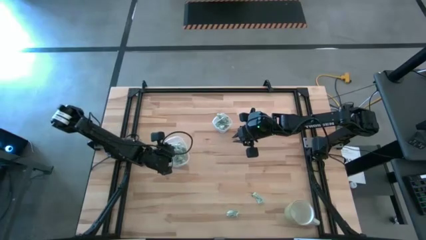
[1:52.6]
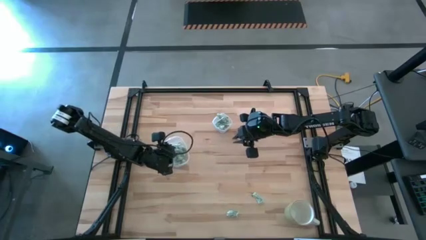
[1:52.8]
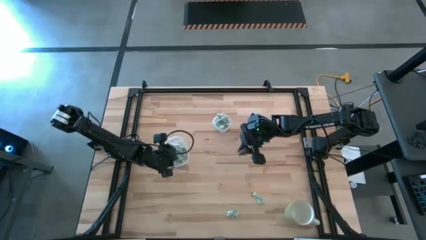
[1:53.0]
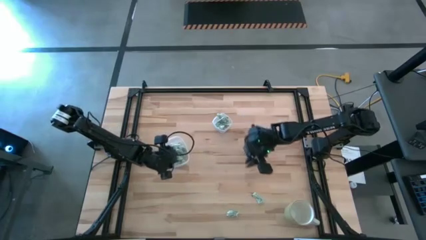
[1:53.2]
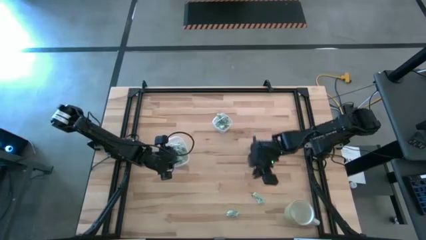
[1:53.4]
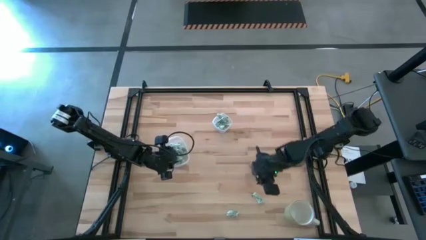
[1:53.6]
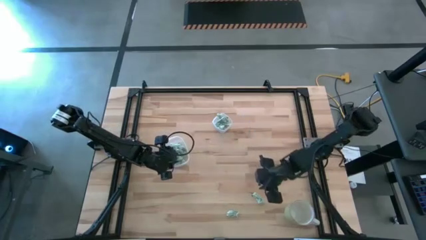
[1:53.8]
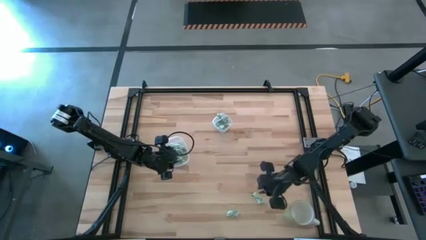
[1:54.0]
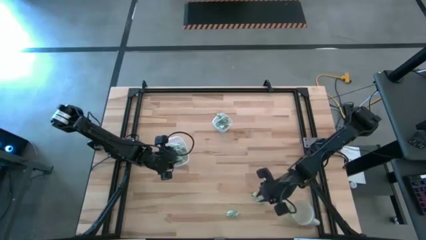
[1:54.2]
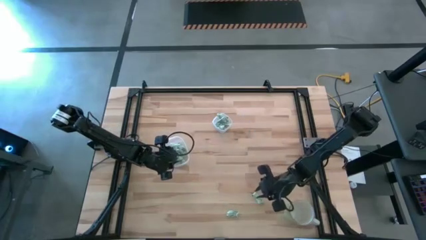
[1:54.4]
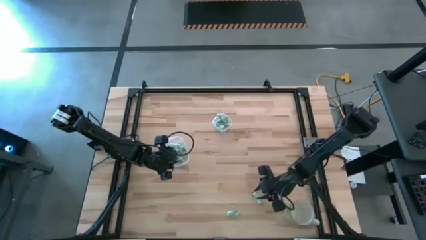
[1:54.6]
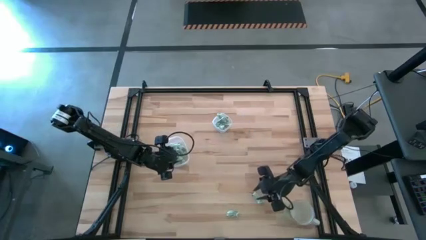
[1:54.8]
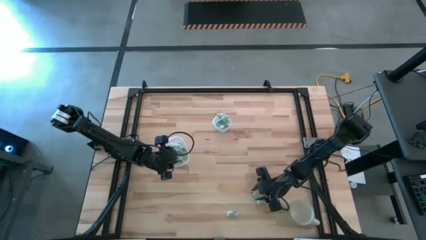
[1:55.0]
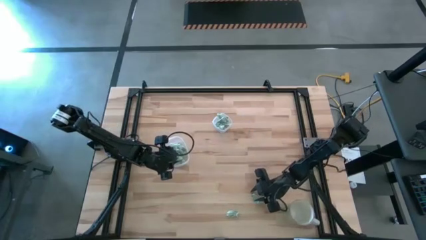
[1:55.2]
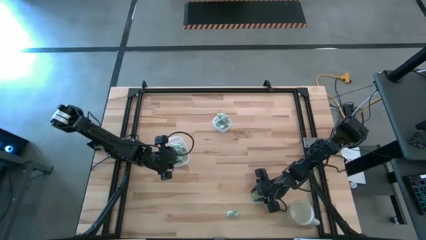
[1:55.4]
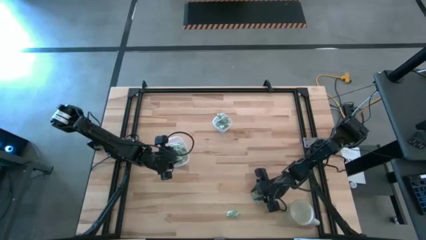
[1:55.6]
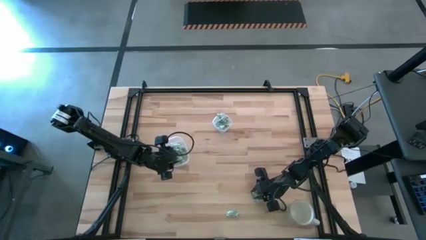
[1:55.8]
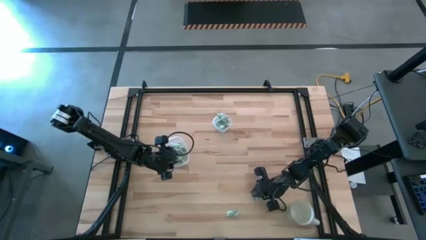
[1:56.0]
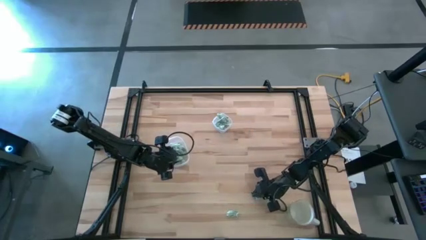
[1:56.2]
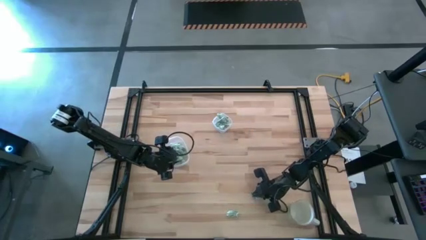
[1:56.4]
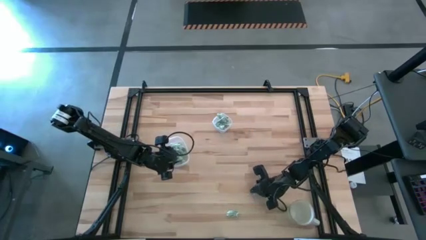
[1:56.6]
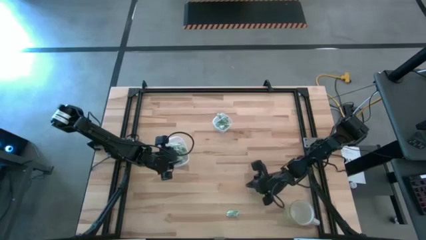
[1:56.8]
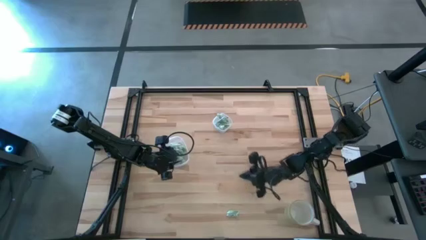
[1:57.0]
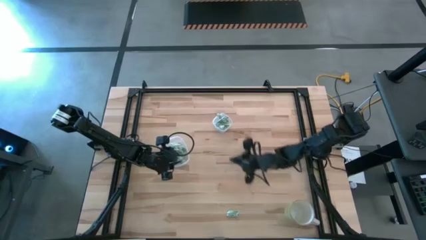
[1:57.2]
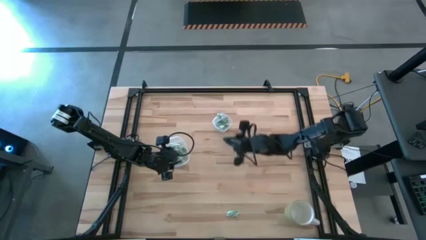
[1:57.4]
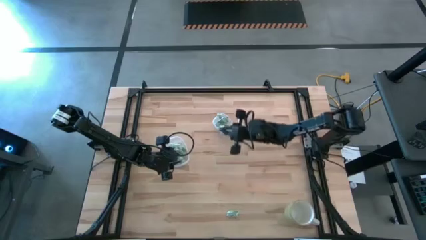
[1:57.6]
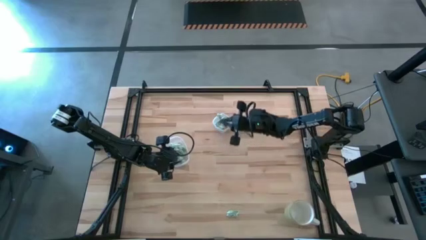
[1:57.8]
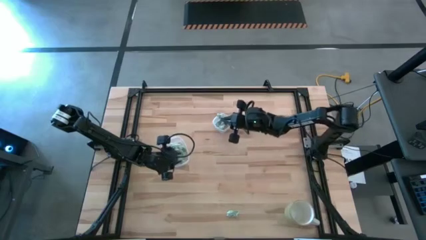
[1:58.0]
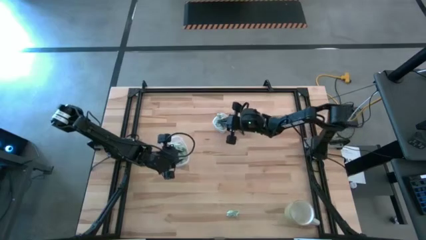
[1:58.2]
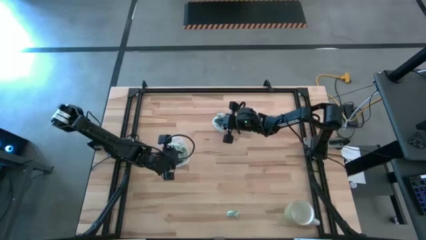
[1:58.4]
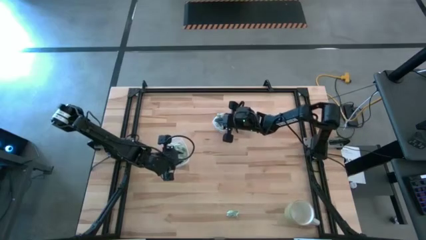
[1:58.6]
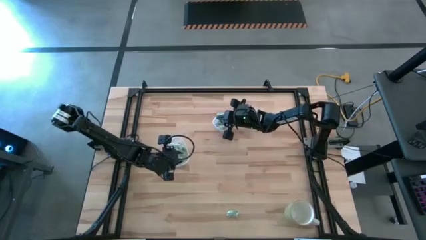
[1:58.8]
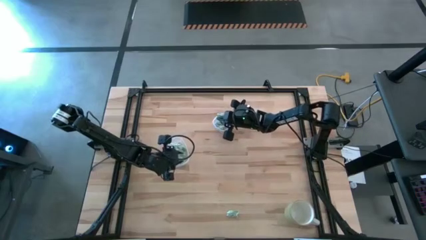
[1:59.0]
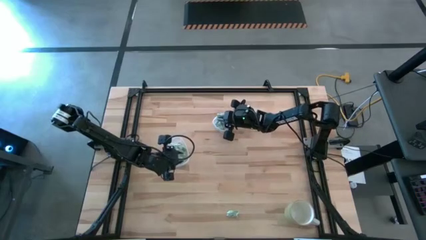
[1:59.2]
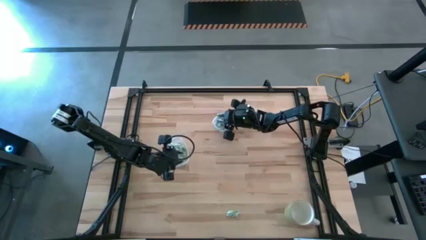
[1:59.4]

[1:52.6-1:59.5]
Task: Pick and place items into bin
Put the stevia packet into the small transparent container

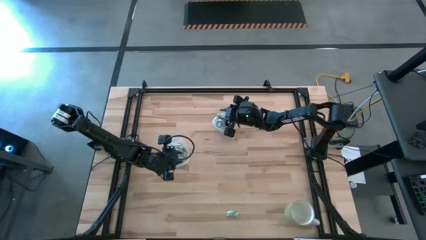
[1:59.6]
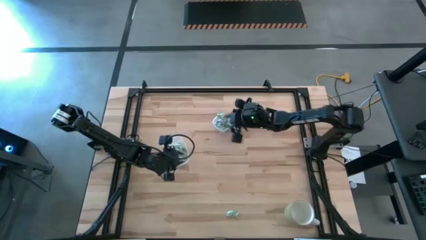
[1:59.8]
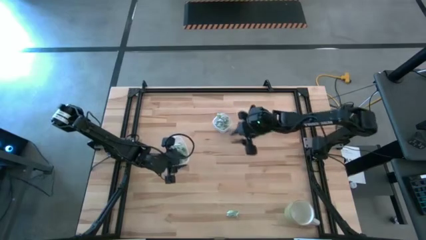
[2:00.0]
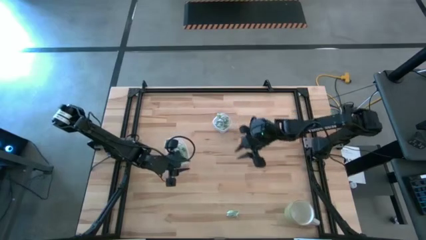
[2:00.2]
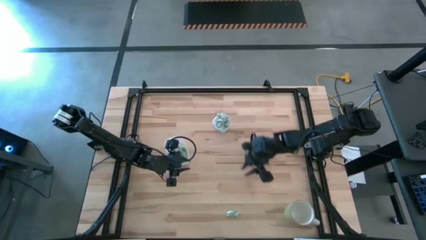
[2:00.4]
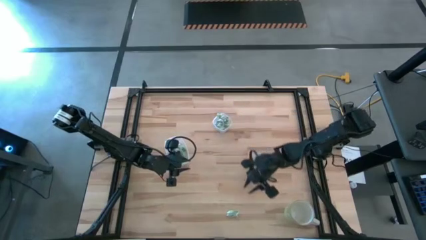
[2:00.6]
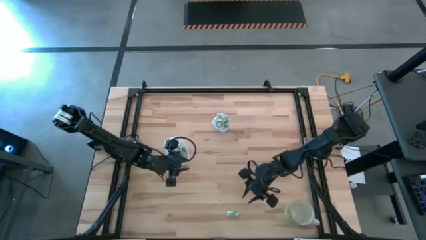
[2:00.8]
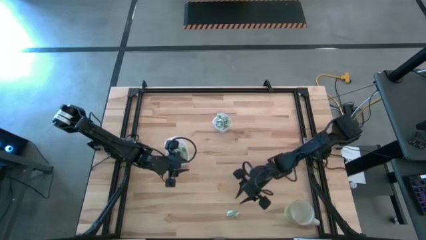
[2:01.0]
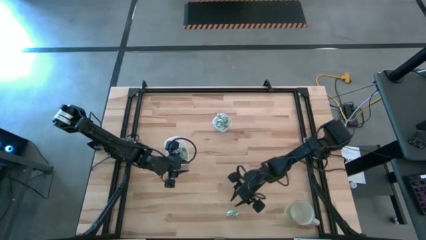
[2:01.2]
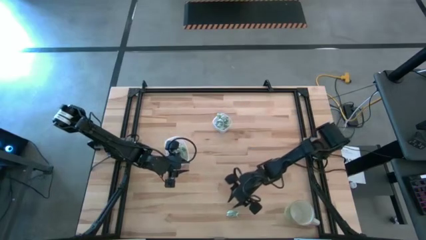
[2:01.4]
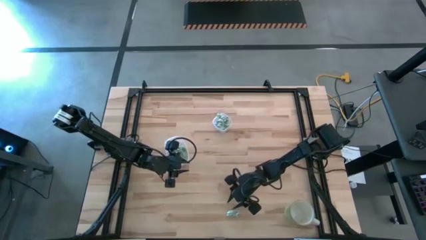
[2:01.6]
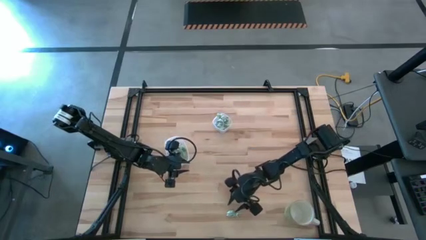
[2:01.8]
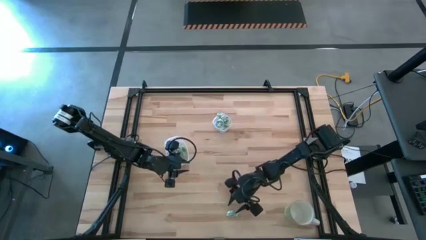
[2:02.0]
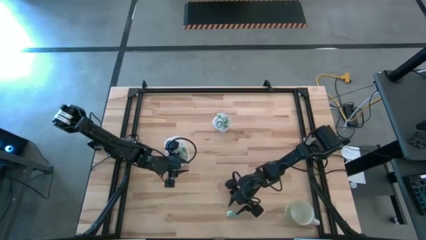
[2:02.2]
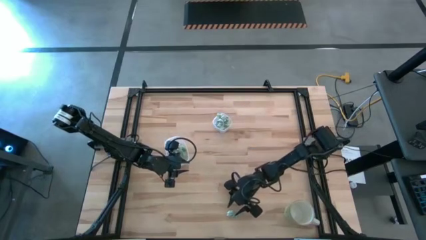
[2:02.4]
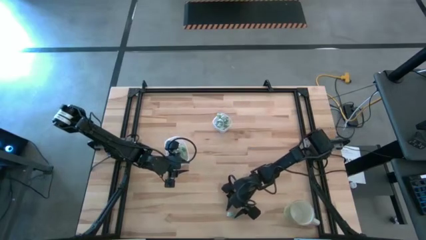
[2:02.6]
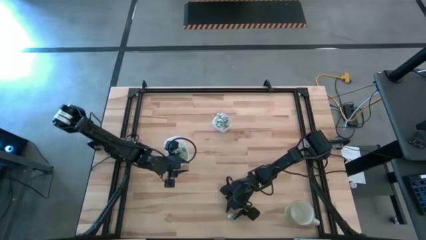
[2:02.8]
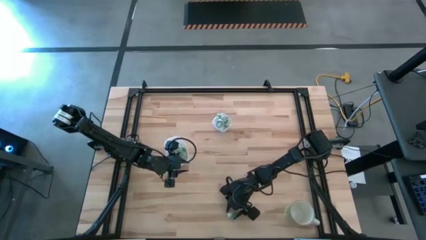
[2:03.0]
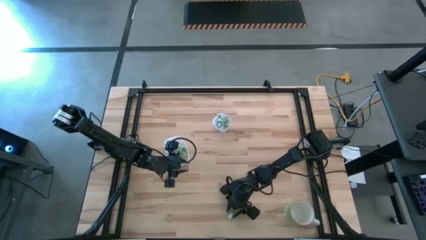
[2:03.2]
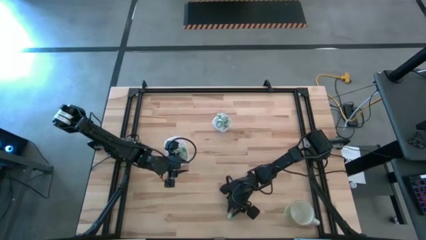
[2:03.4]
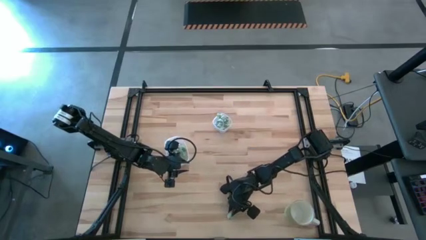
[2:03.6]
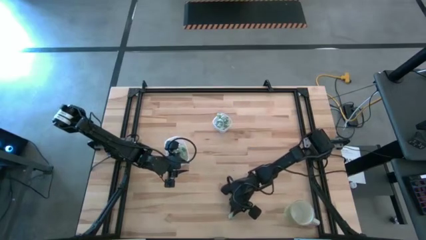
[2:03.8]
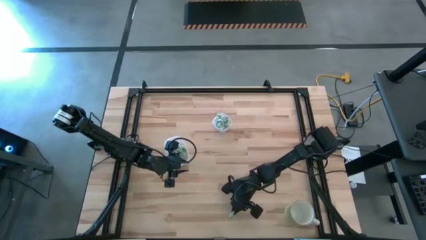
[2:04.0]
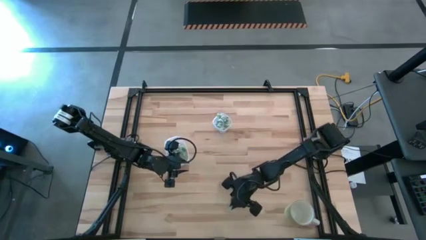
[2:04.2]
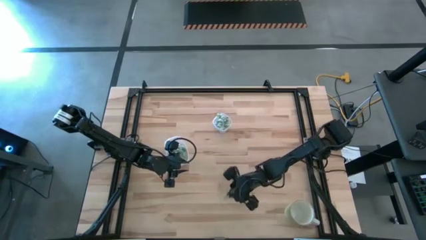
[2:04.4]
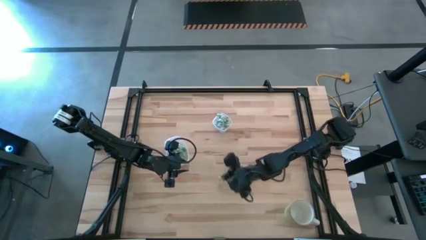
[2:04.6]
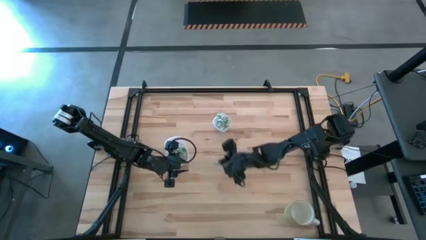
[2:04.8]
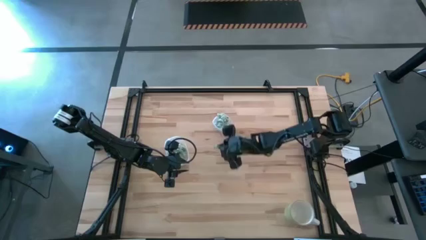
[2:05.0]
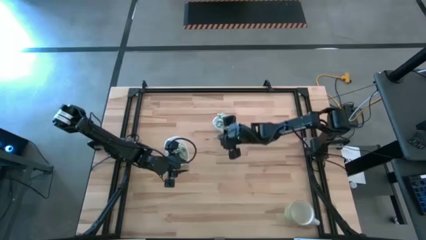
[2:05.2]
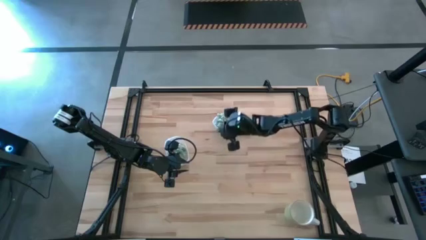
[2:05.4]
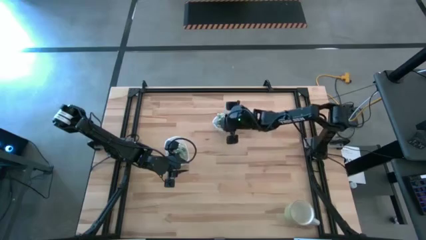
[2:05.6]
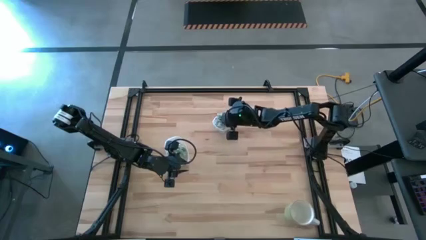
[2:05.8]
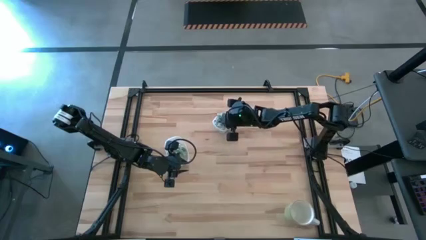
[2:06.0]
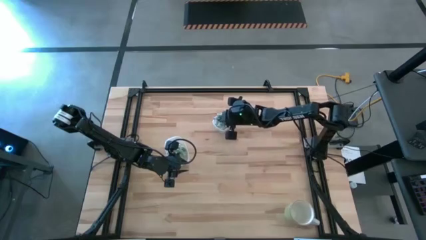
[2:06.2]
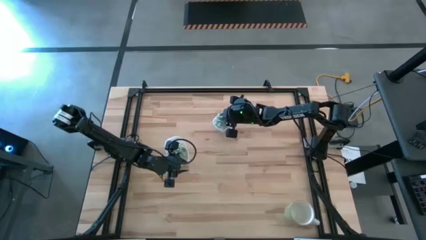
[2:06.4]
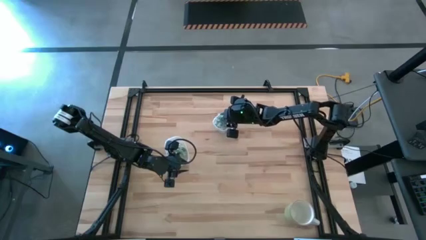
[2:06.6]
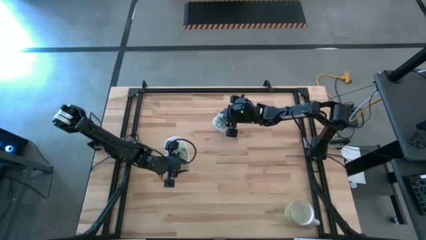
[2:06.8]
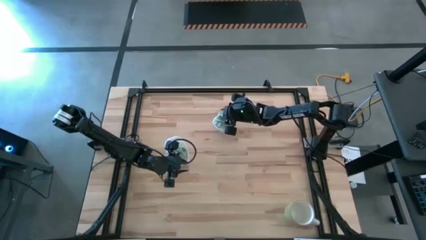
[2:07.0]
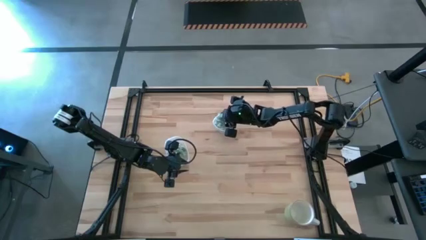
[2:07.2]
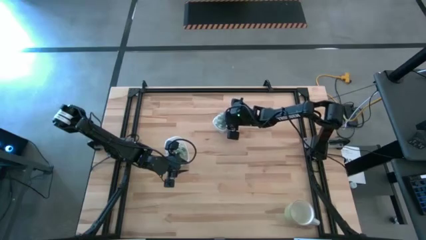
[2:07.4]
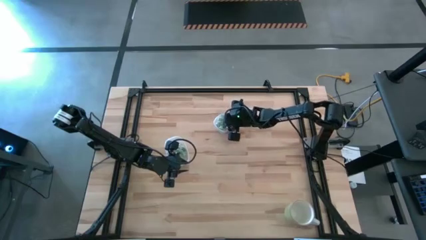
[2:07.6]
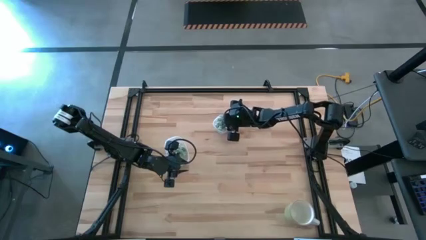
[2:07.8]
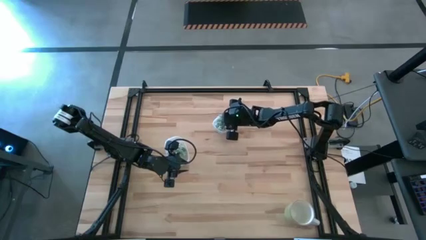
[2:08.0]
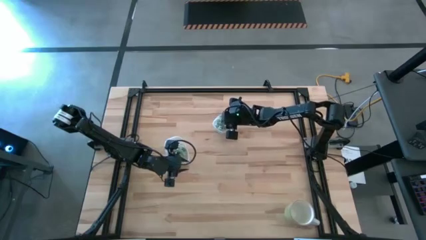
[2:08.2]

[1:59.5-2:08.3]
Put the stevia packet into the small transparent container
